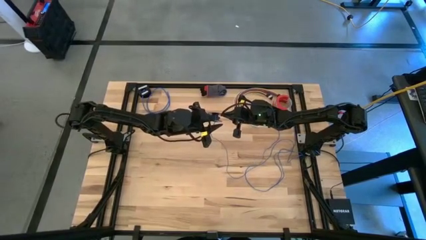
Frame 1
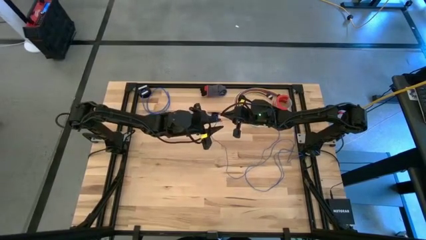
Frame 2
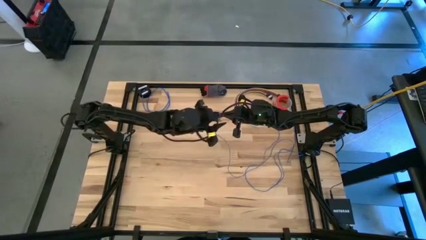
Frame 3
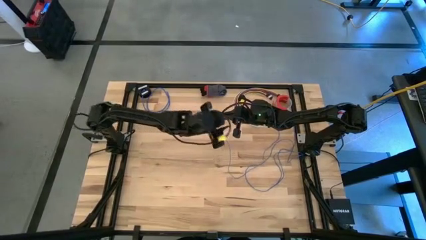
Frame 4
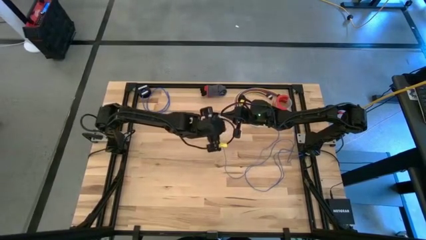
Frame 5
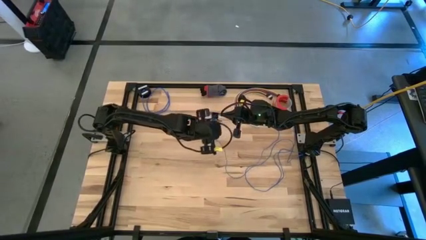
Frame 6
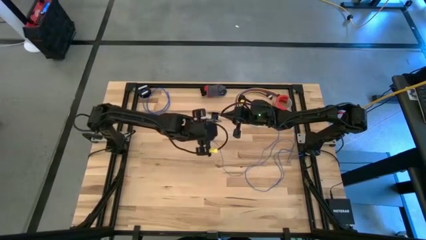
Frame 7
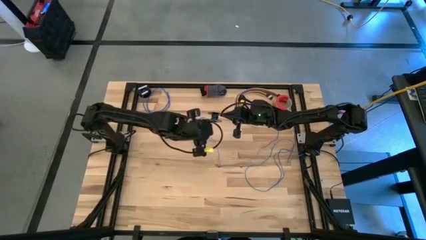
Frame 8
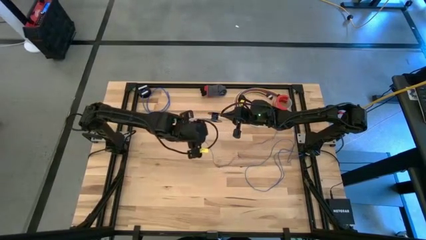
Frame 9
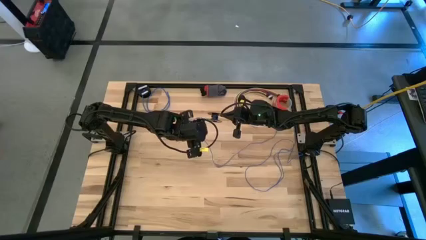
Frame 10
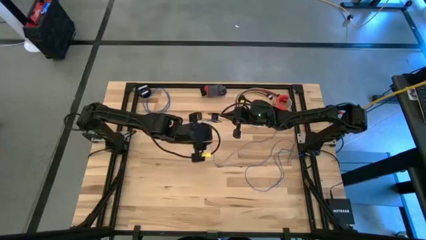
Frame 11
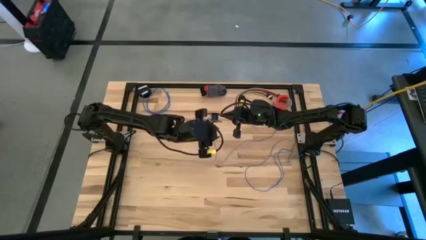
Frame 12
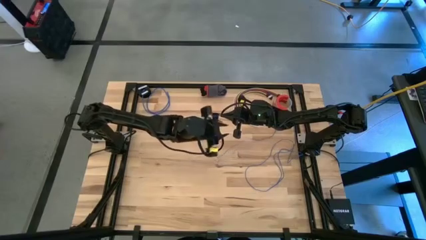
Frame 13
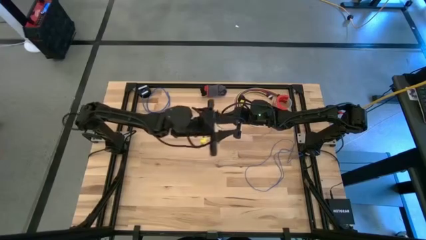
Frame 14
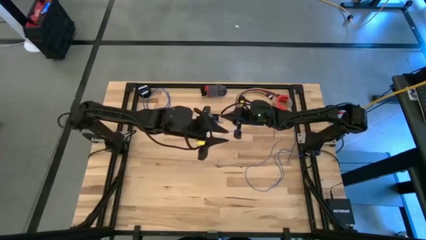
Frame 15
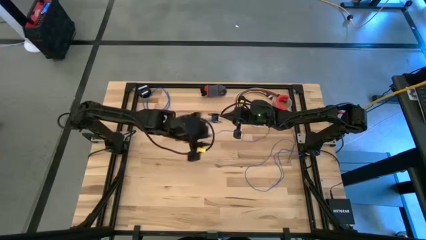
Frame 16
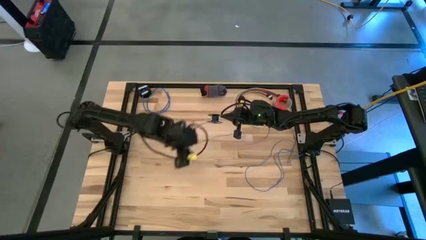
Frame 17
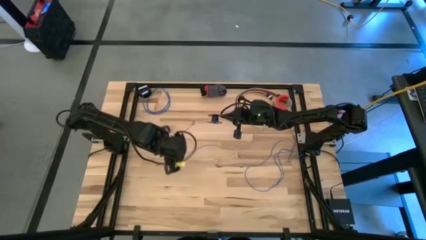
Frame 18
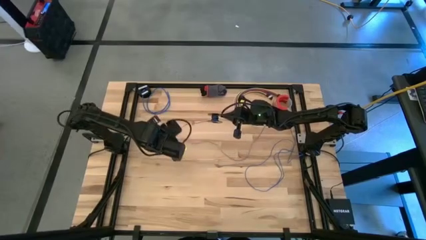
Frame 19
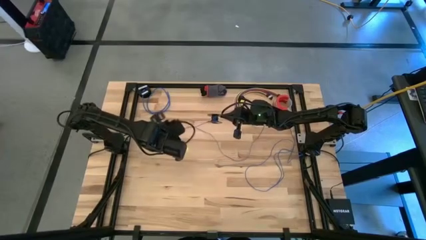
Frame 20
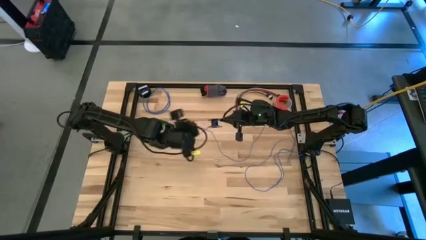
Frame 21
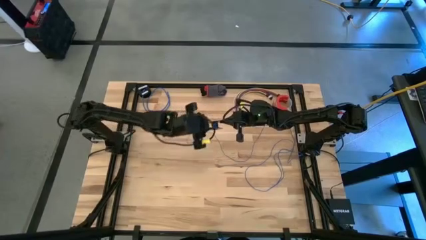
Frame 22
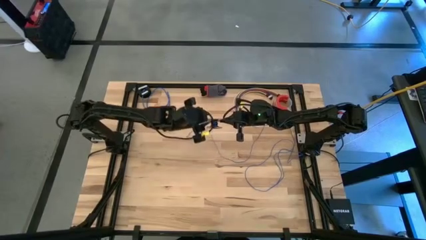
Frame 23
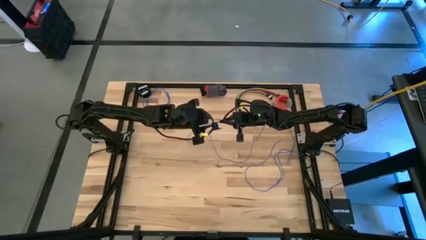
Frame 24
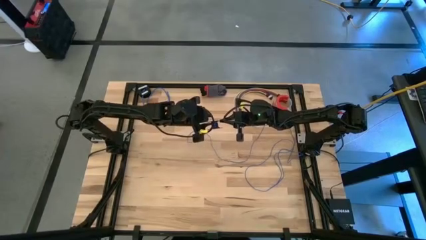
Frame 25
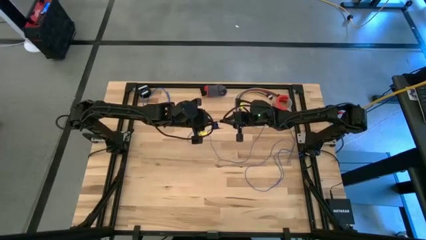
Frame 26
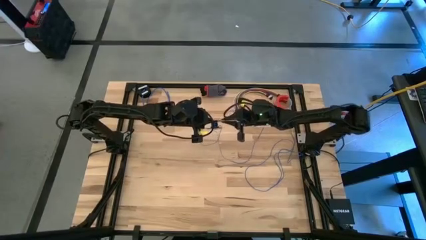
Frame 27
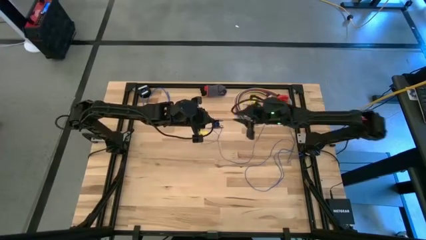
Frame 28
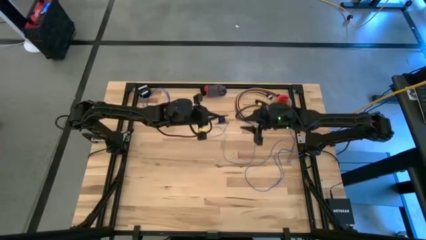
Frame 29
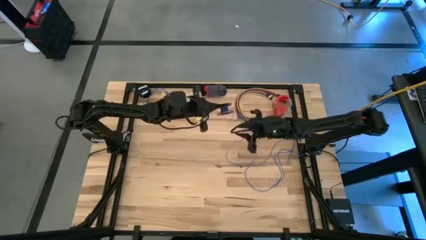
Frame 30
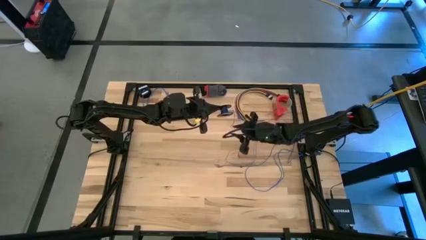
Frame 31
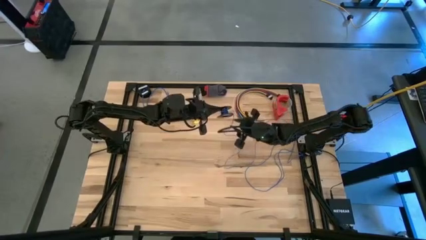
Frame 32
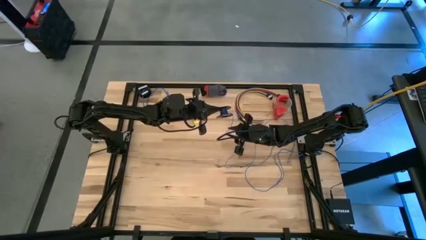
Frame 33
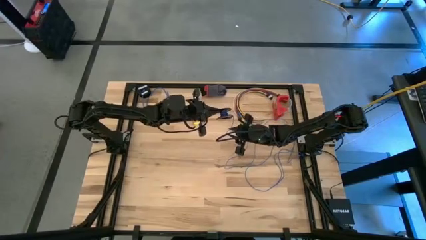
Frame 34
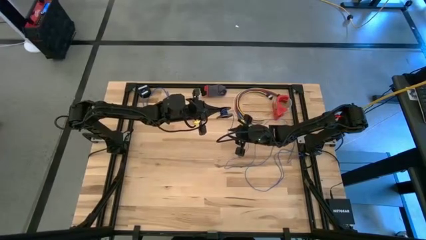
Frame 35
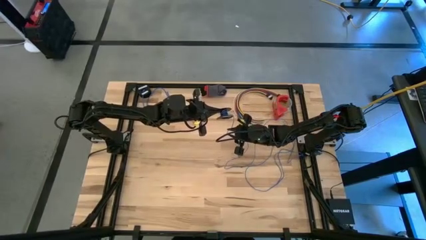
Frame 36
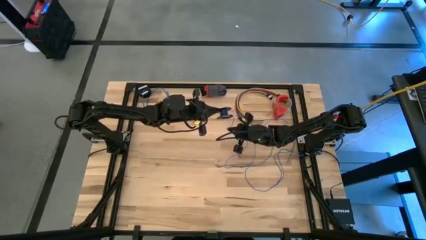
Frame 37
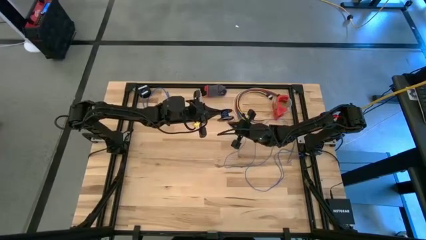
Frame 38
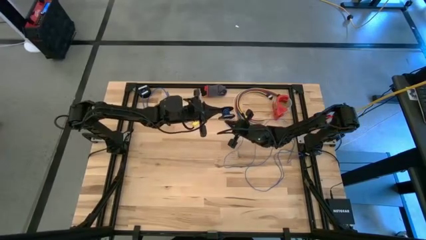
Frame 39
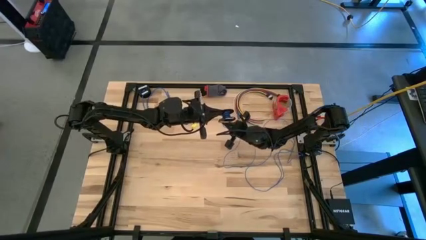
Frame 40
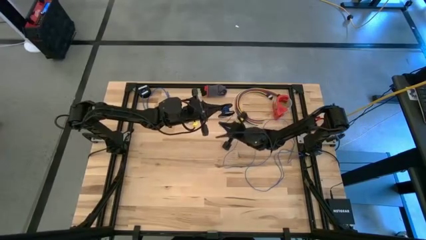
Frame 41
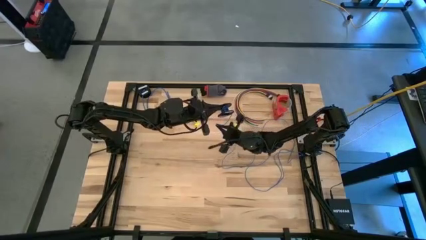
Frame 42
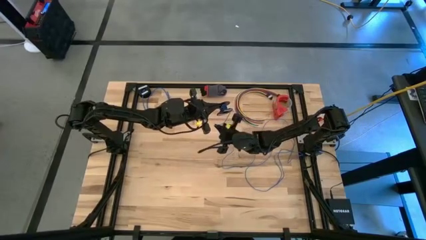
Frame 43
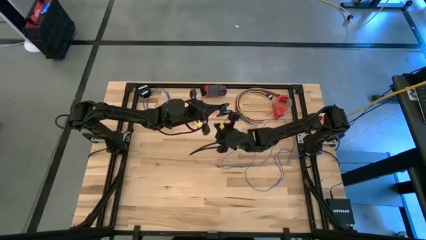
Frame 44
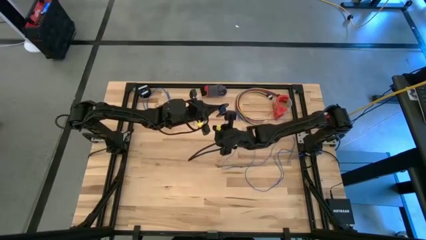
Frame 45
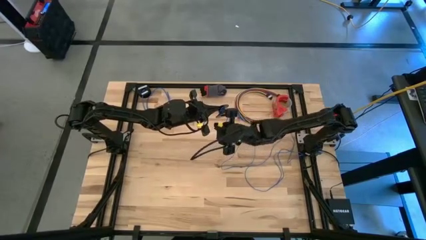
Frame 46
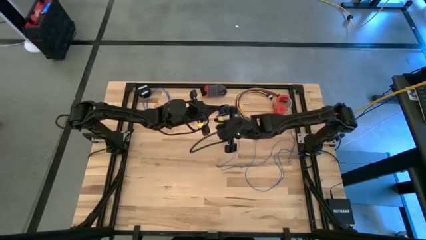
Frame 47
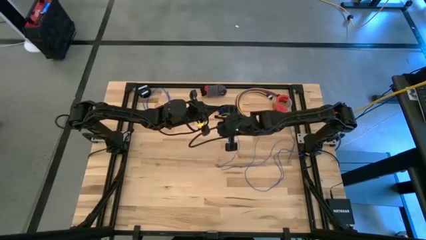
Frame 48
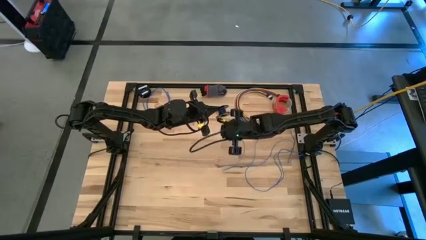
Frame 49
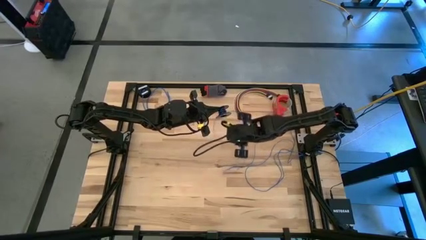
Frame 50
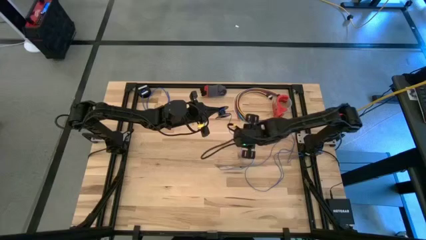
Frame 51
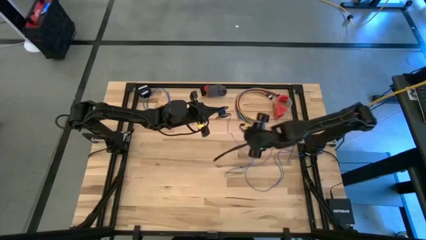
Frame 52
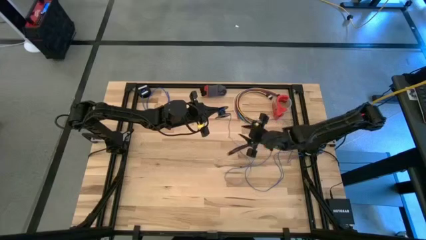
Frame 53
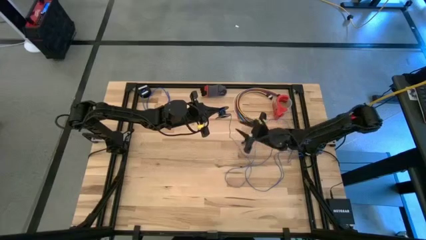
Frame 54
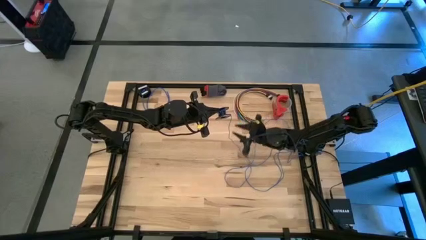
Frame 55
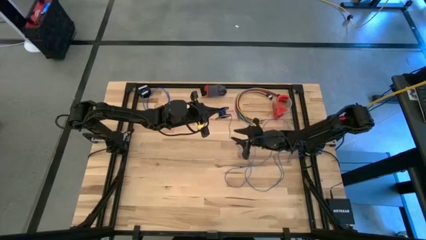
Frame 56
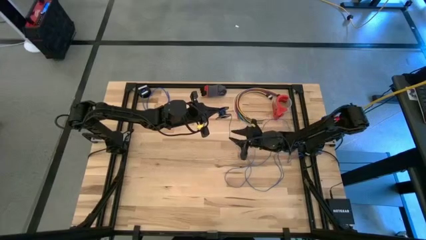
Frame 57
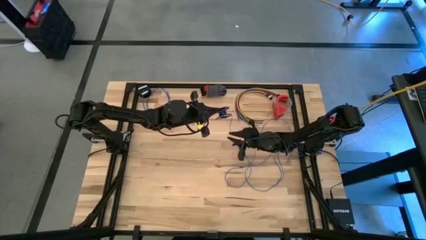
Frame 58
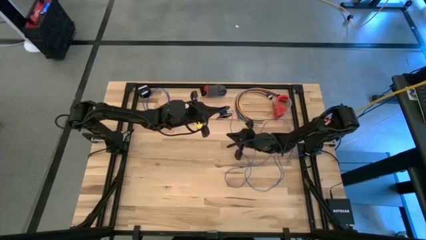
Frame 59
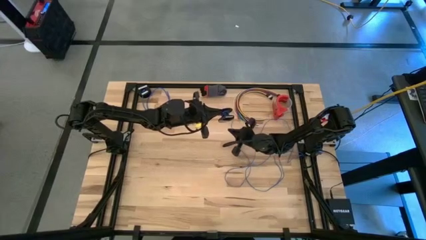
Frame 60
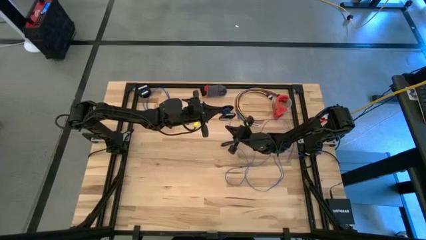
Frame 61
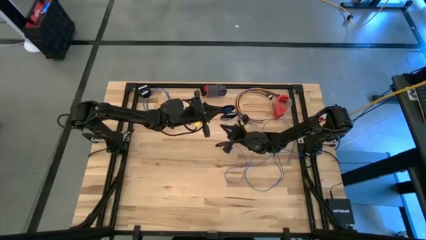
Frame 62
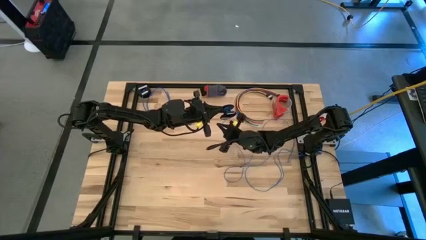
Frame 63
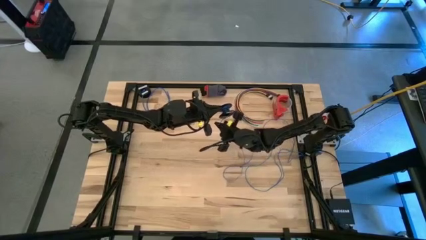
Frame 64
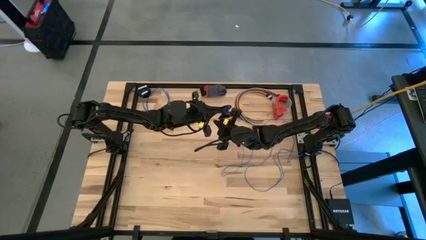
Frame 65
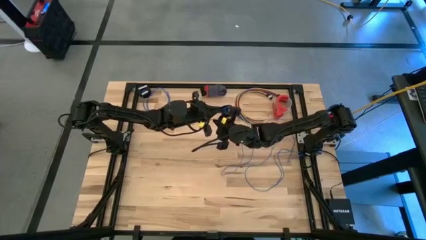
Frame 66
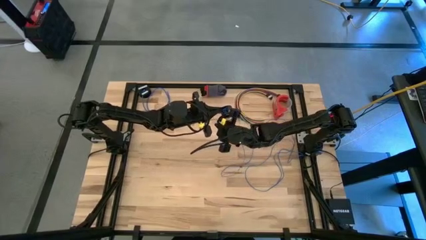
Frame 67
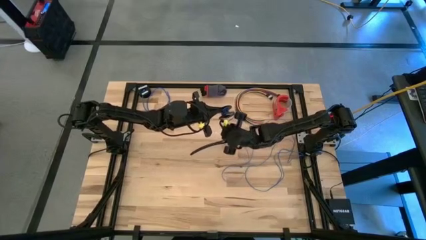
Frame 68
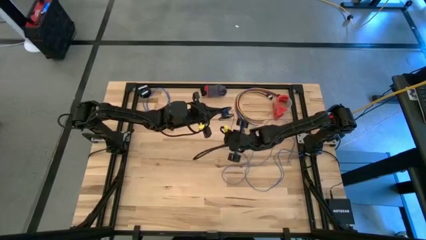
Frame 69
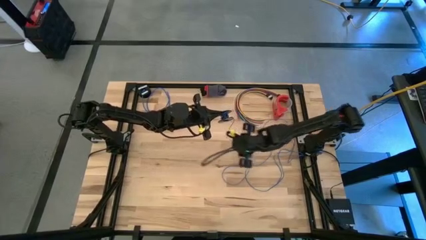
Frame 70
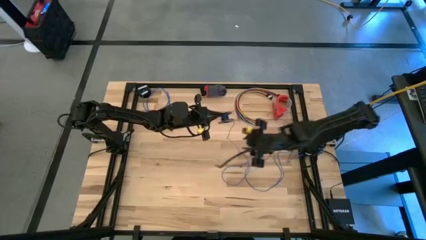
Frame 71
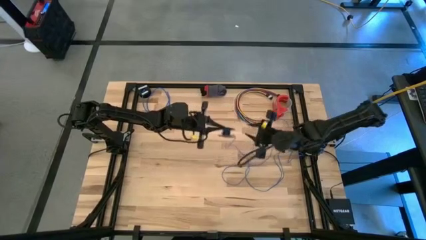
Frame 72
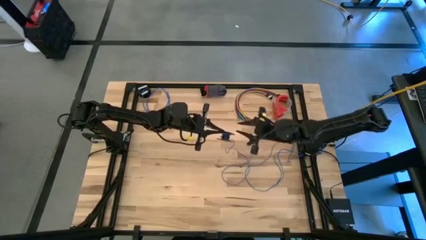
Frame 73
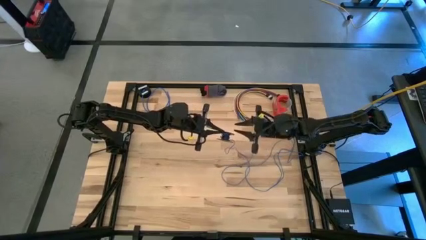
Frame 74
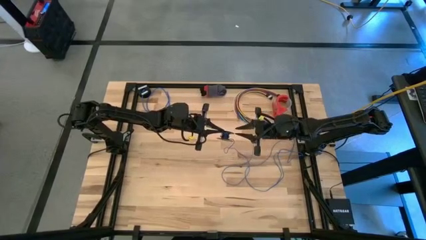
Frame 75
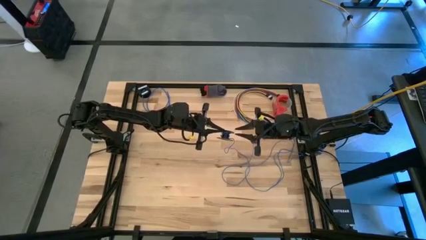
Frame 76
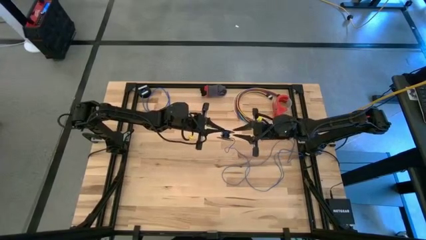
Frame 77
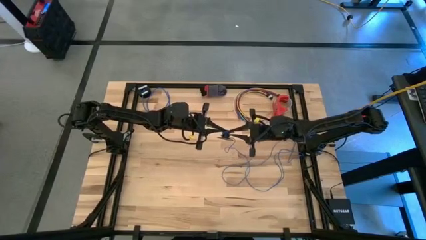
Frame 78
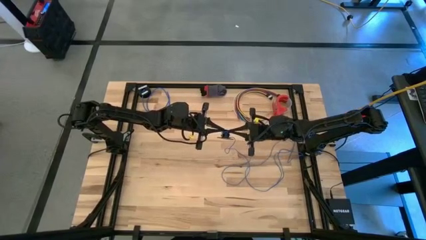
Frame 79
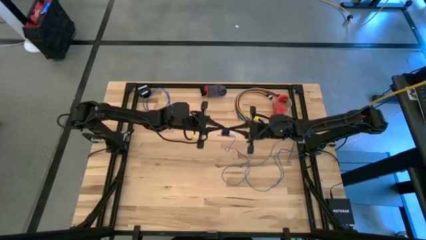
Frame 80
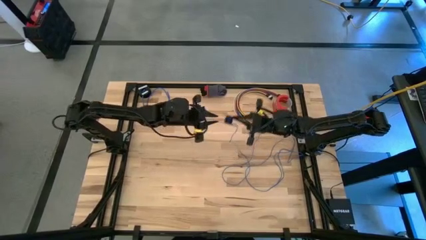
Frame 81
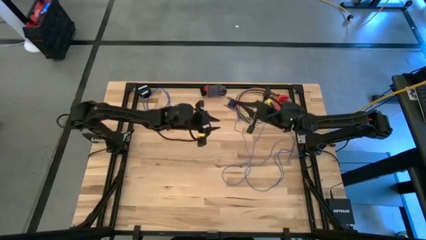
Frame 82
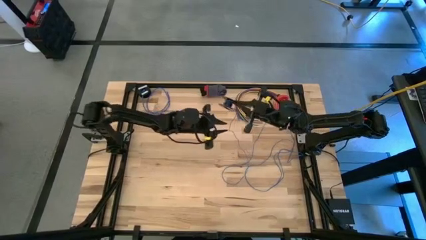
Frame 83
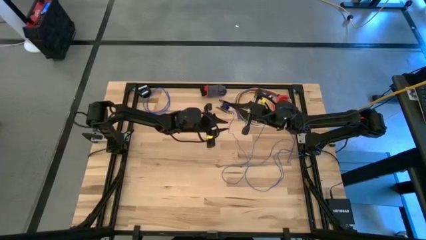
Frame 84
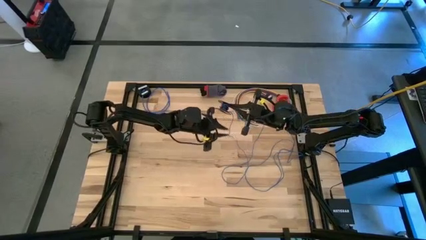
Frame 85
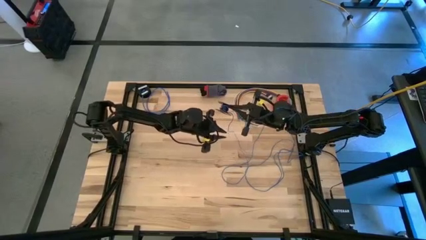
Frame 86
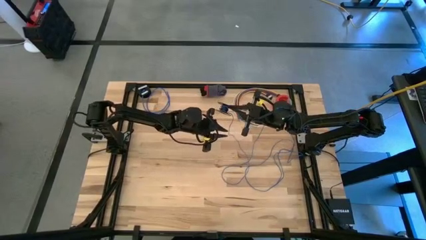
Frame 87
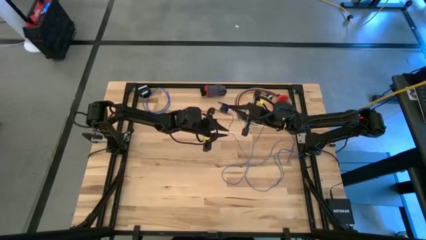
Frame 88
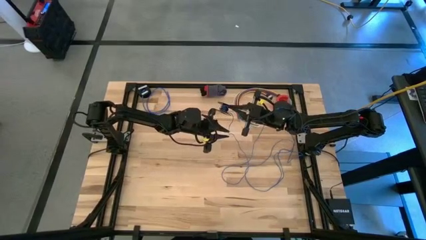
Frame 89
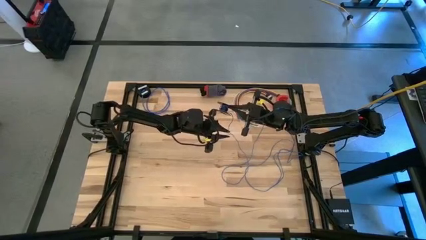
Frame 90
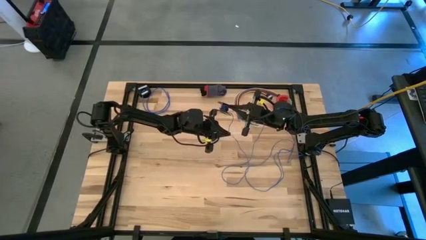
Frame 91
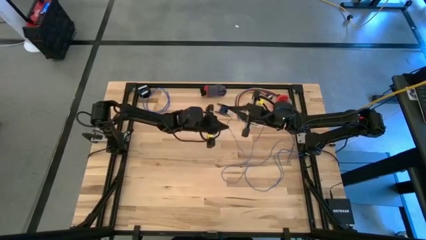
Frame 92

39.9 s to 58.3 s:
Task: Coil cords
Coil the blue wire on the black spool
